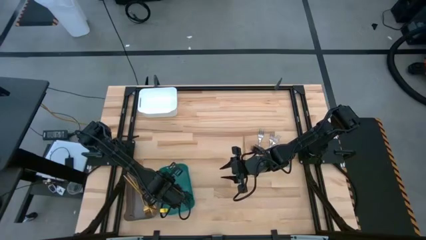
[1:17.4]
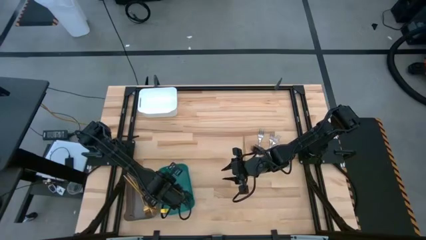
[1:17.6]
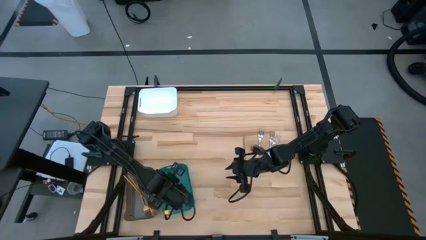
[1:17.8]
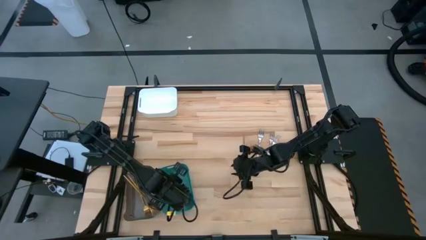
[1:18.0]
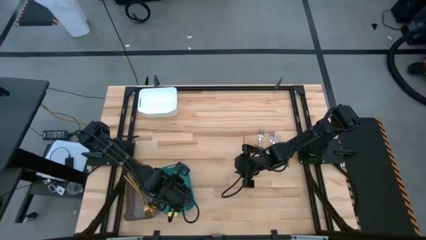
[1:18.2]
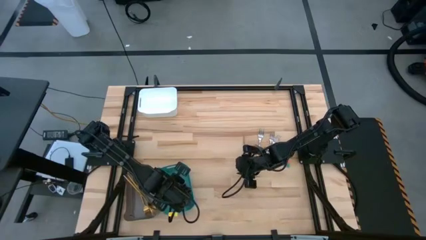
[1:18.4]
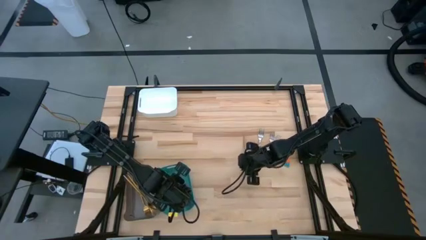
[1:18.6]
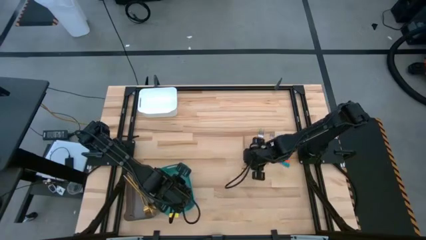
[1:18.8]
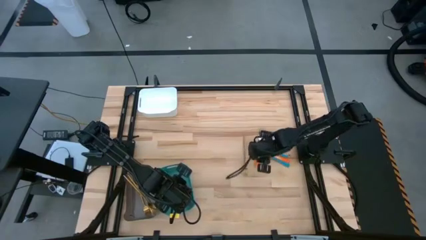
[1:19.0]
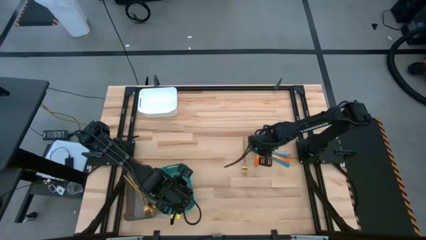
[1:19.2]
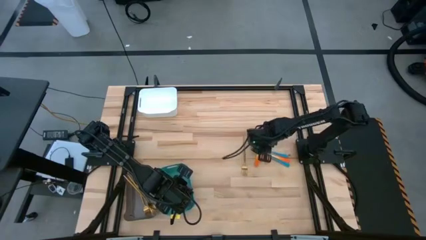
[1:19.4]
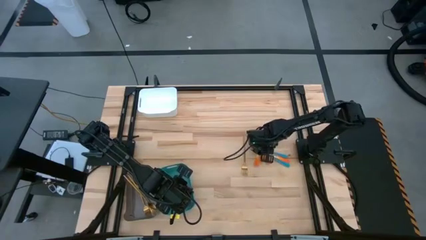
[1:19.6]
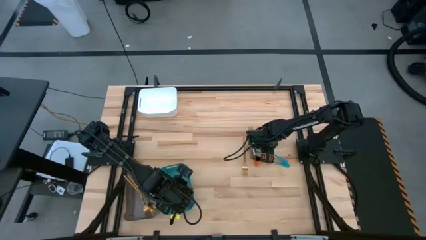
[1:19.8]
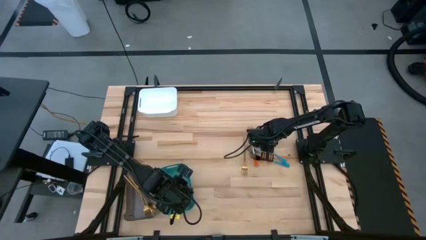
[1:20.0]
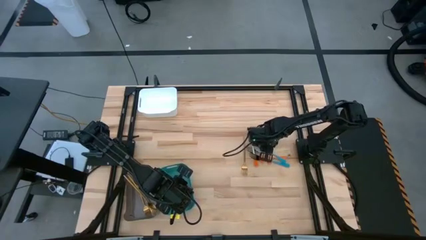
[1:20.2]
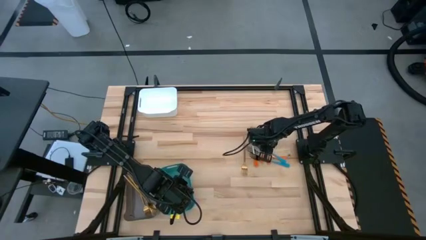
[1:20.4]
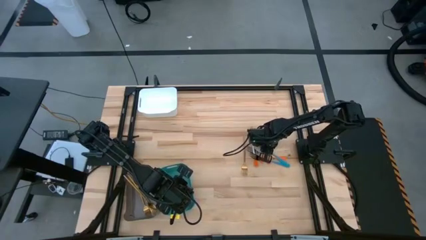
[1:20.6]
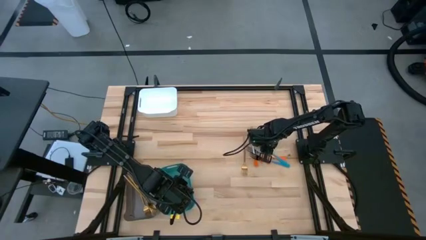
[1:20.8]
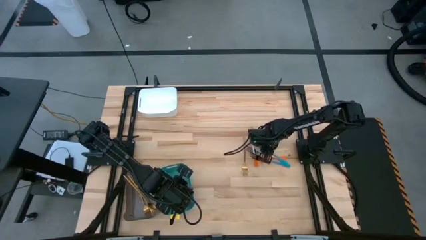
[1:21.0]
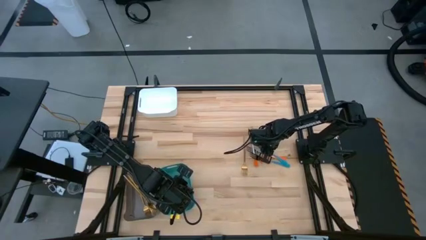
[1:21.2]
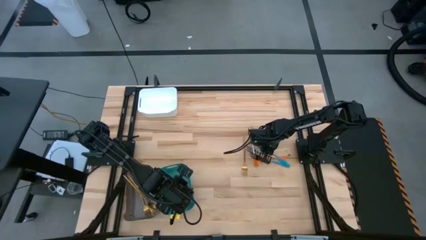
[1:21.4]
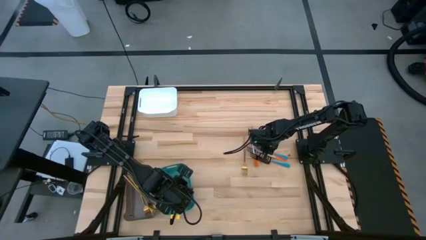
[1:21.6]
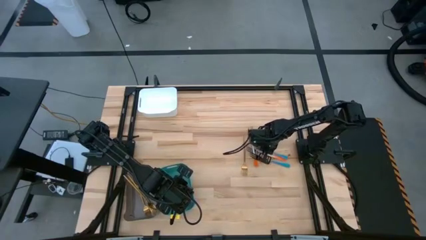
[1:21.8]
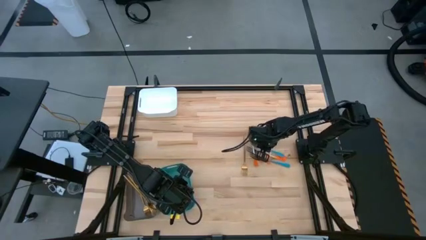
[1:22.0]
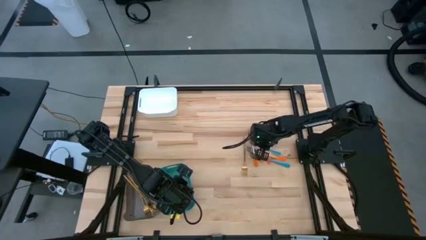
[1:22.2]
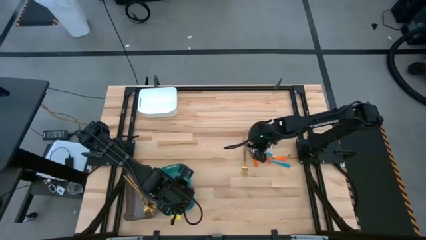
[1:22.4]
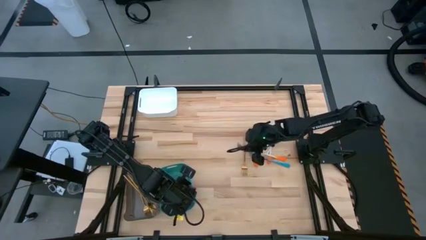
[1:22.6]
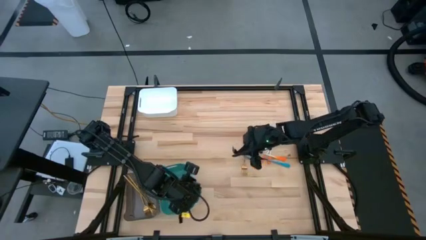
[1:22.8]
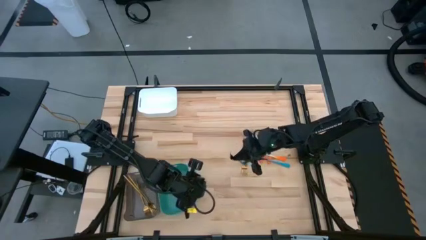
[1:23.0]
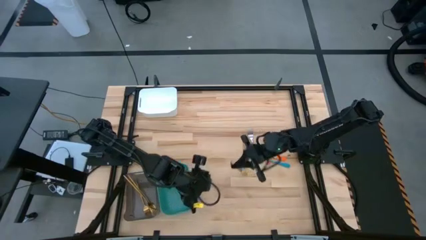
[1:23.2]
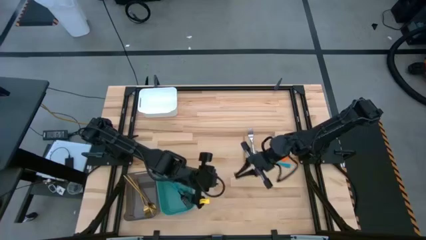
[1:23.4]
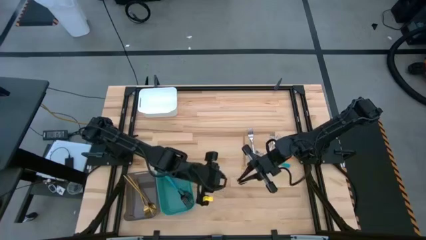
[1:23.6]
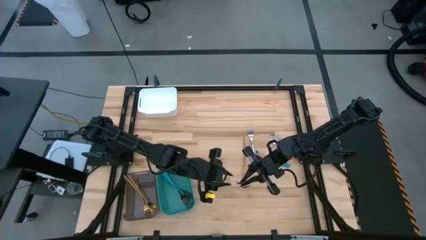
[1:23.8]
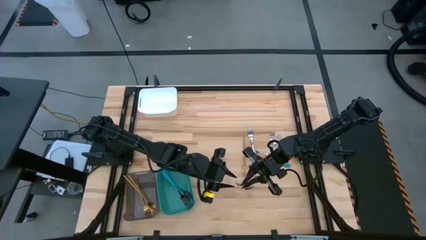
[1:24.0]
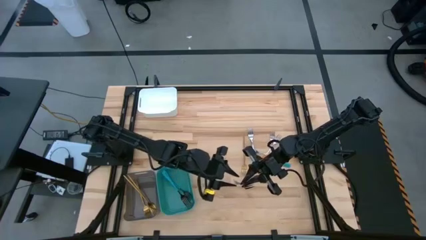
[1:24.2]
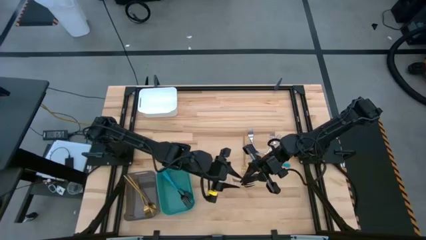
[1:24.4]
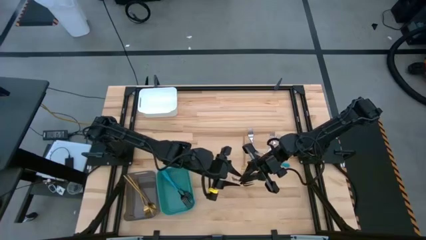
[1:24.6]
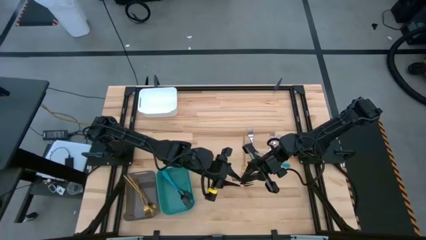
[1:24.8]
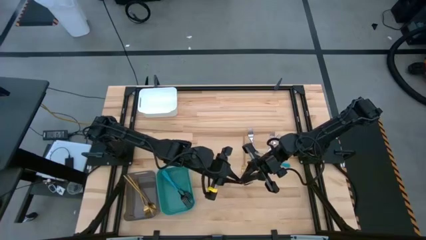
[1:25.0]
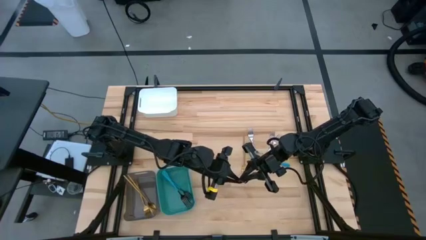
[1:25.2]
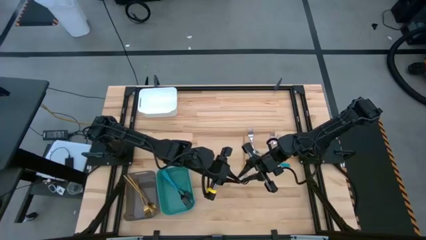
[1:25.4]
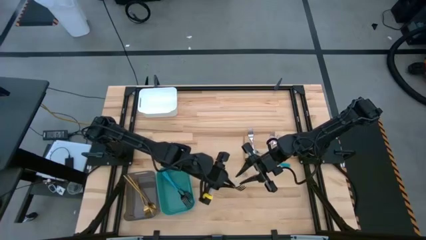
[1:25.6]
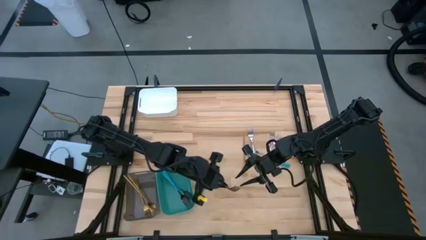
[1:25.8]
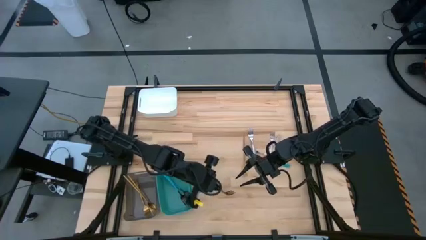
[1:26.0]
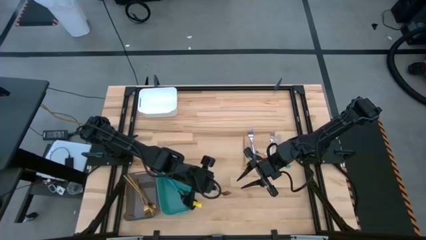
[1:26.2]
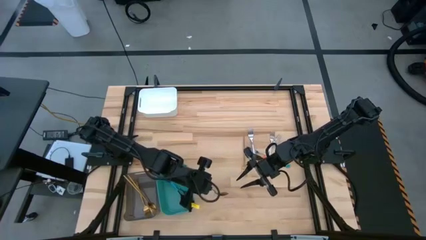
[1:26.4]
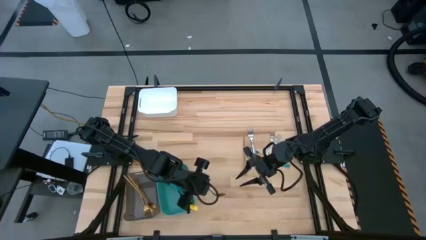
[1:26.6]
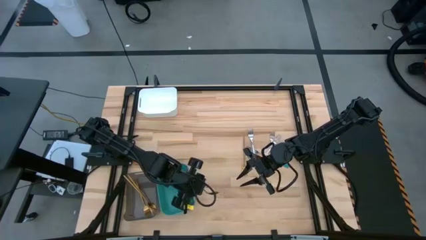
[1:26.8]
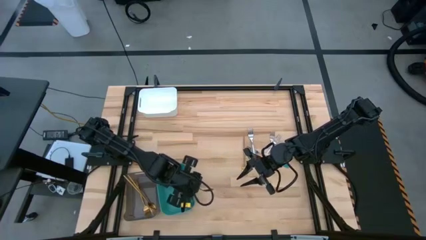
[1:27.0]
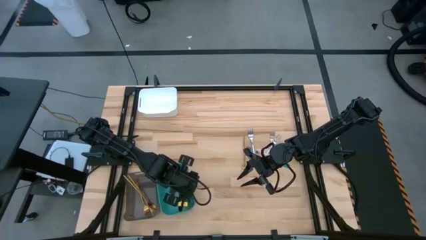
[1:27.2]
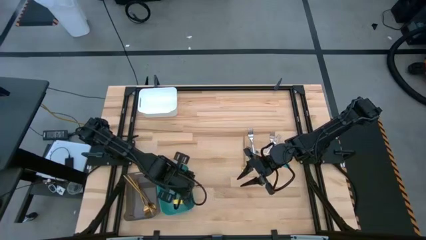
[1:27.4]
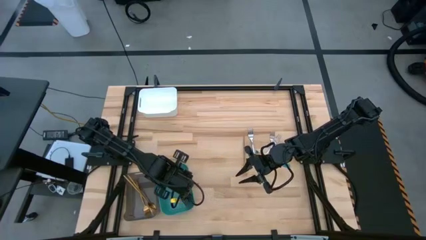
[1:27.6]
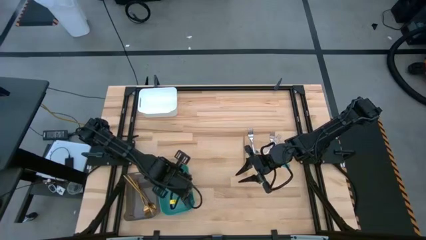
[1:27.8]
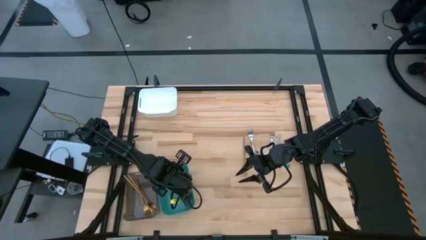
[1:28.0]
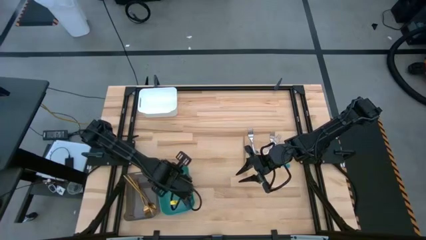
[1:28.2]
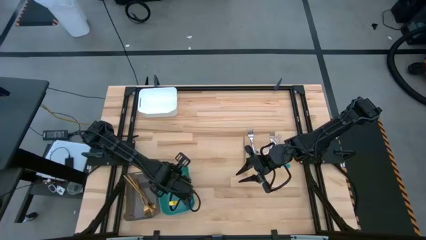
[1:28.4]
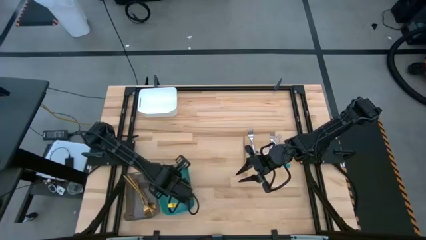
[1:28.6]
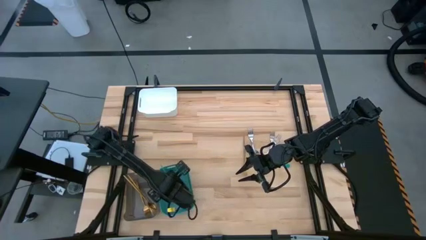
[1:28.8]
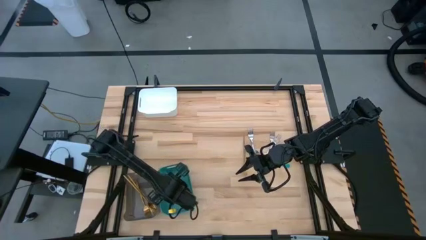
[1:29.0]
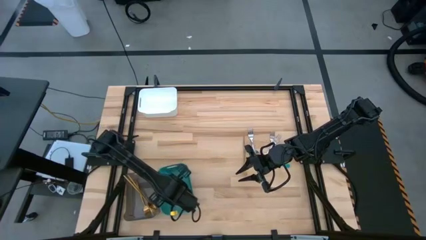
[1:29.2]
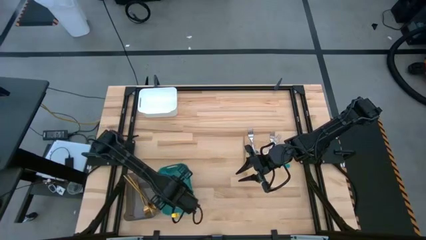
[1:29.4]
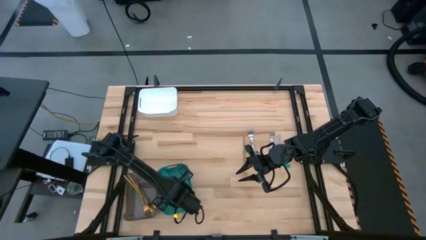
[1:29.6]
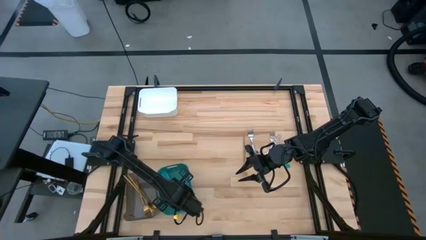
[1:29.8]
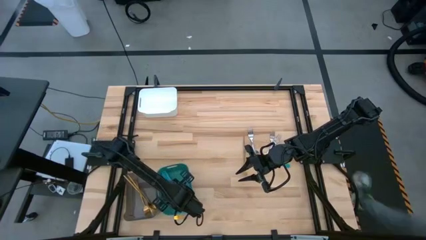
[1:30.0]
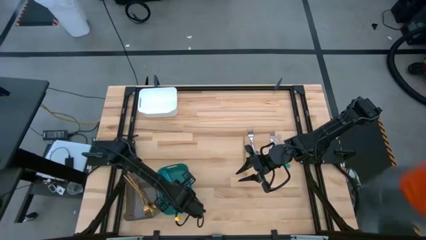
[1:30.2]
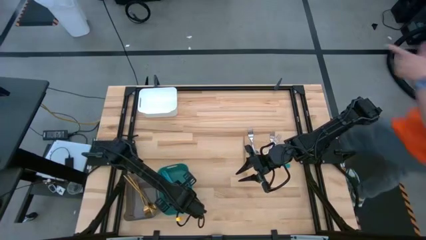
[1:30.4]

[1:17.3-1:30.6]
Task: Sort silverware by color (type)
Put the blue fork into the green bin
